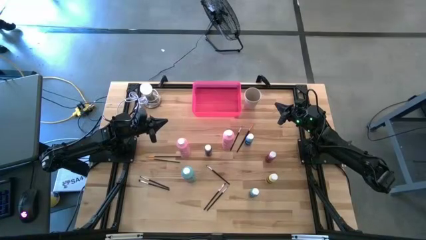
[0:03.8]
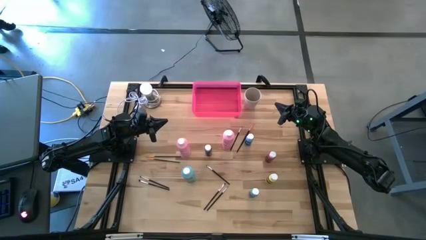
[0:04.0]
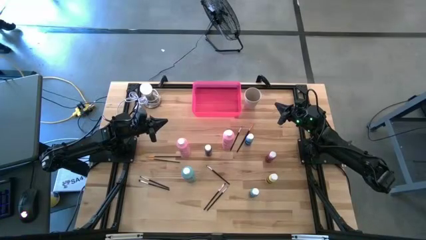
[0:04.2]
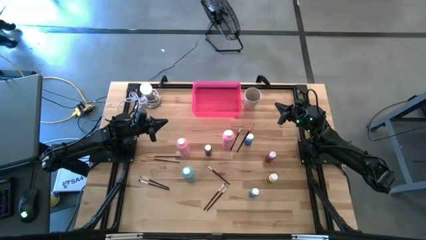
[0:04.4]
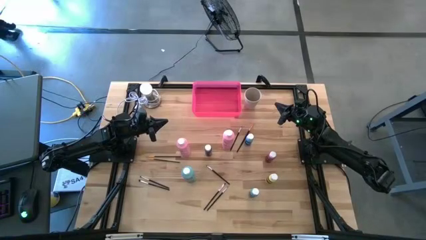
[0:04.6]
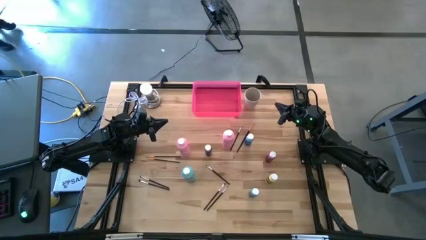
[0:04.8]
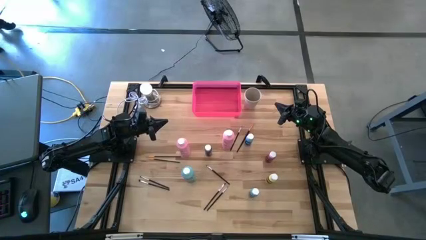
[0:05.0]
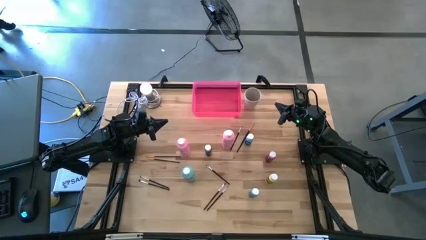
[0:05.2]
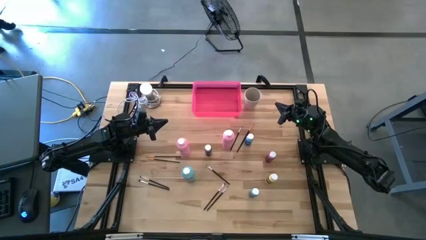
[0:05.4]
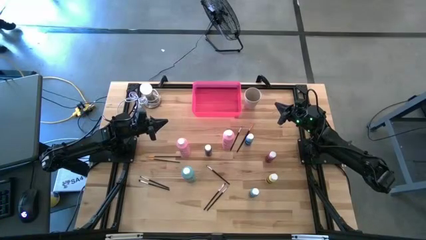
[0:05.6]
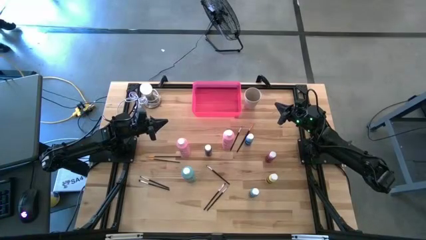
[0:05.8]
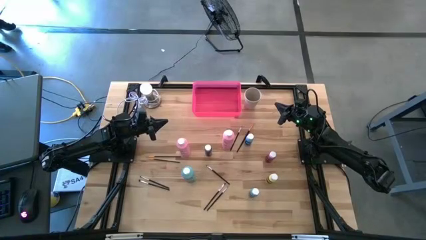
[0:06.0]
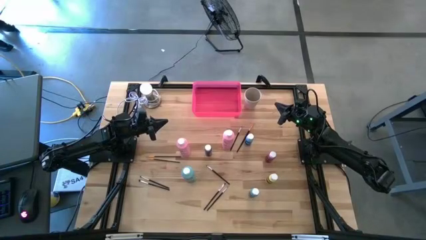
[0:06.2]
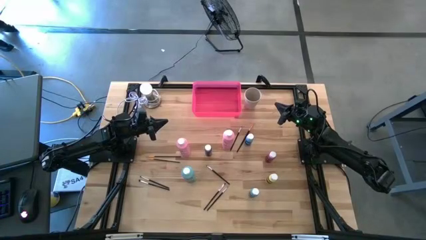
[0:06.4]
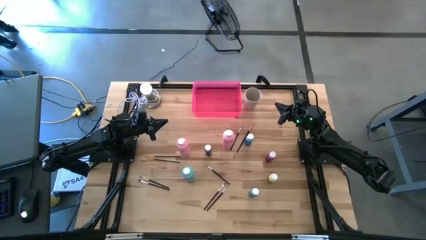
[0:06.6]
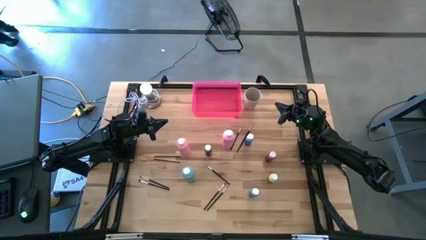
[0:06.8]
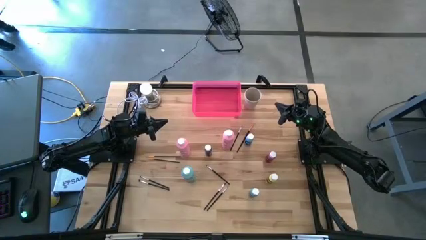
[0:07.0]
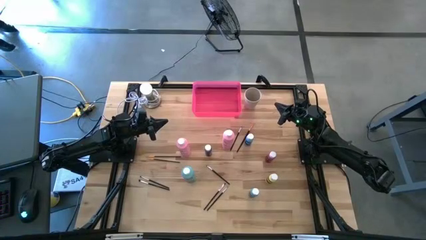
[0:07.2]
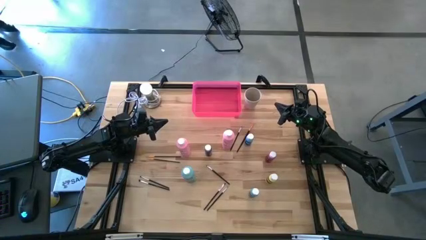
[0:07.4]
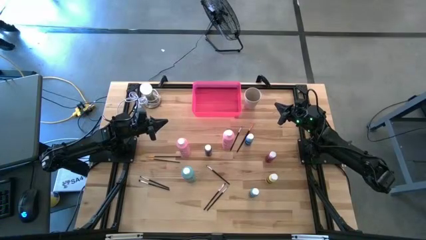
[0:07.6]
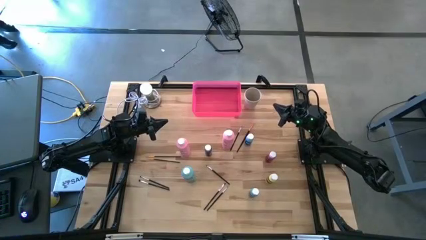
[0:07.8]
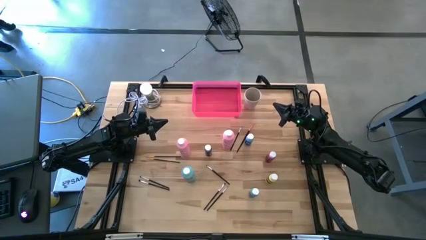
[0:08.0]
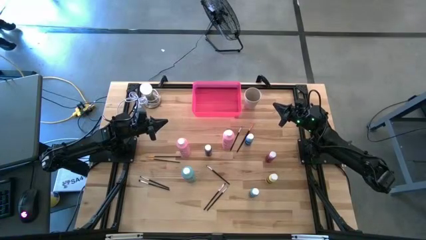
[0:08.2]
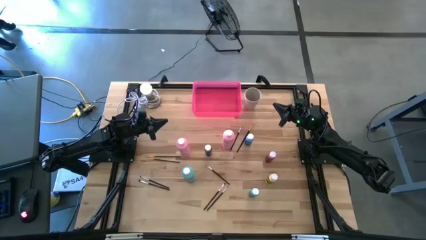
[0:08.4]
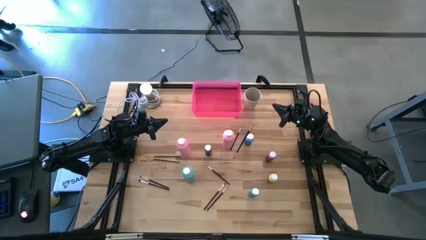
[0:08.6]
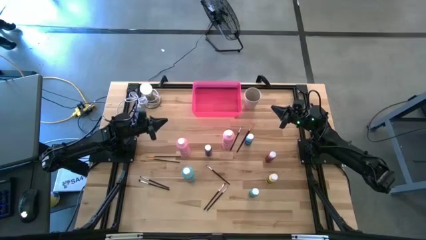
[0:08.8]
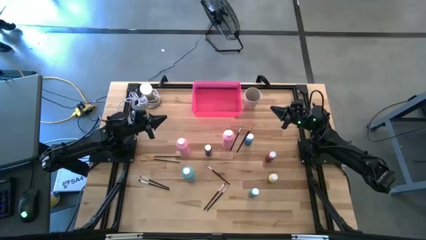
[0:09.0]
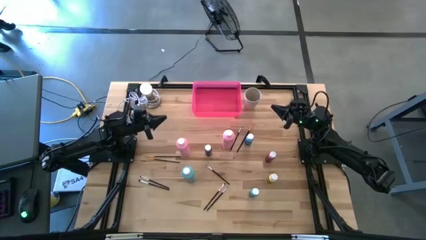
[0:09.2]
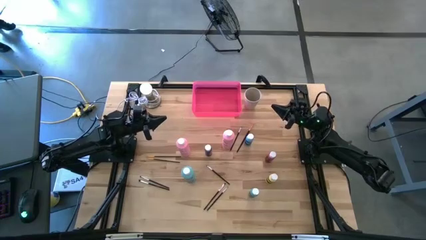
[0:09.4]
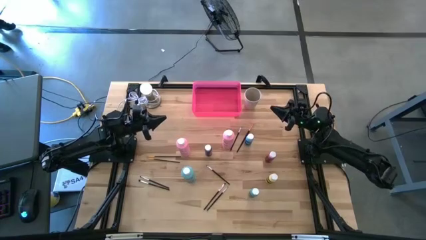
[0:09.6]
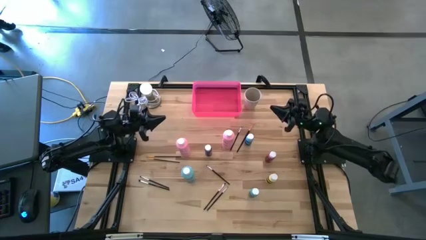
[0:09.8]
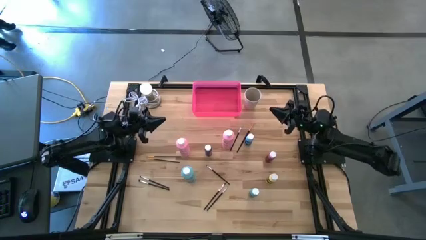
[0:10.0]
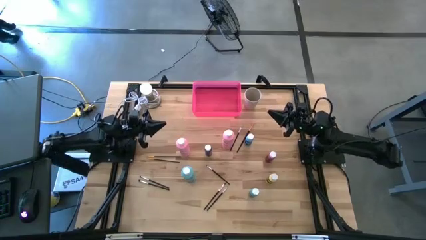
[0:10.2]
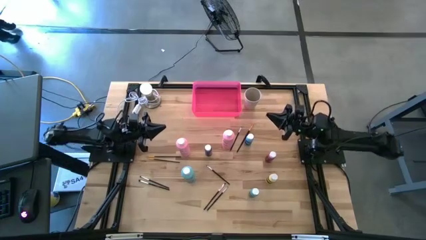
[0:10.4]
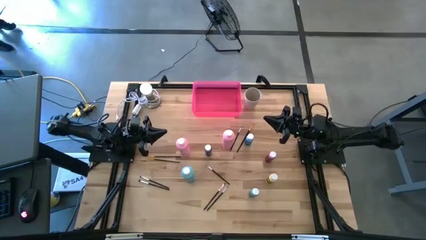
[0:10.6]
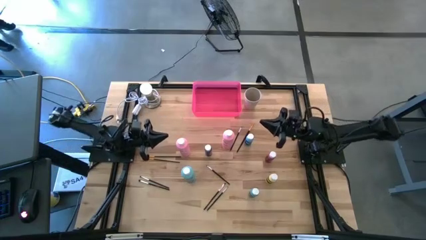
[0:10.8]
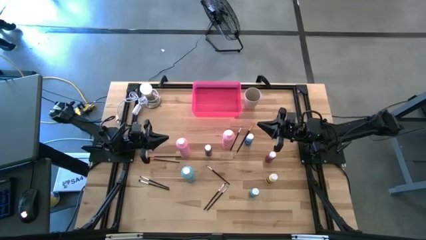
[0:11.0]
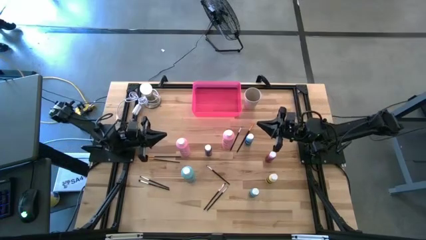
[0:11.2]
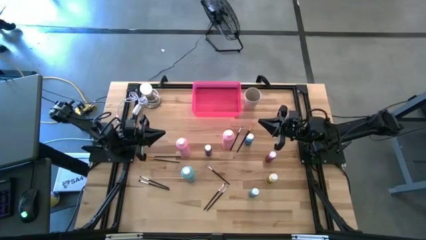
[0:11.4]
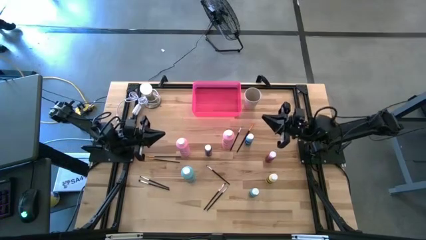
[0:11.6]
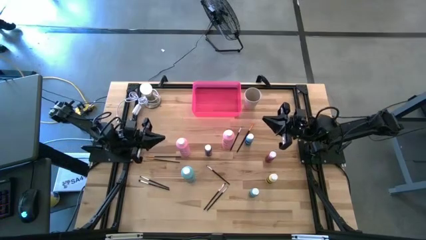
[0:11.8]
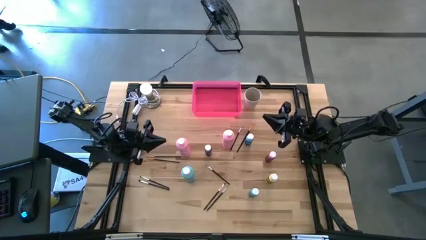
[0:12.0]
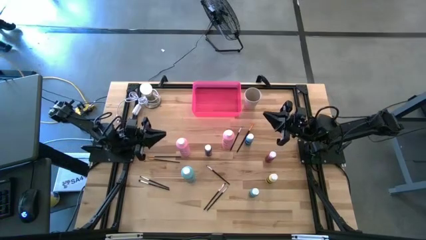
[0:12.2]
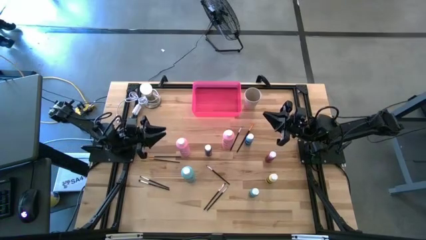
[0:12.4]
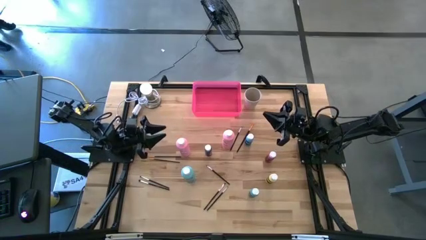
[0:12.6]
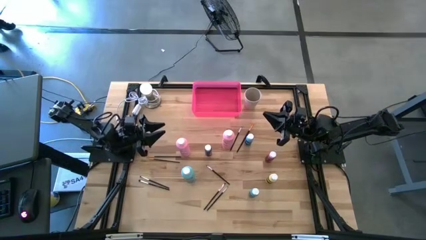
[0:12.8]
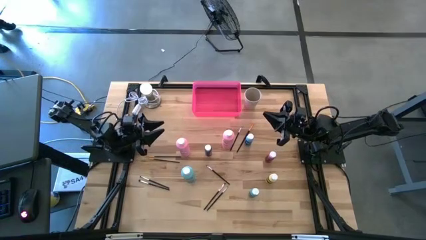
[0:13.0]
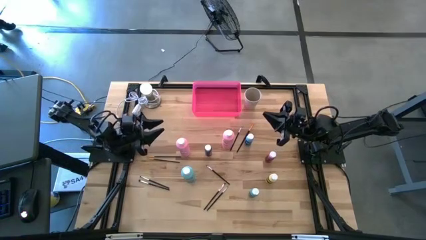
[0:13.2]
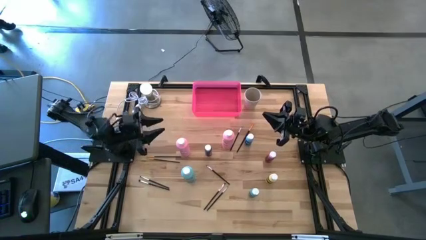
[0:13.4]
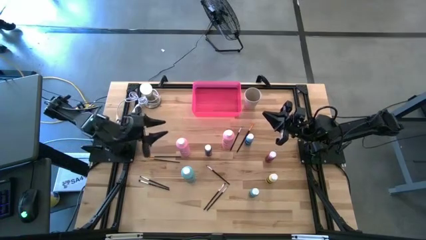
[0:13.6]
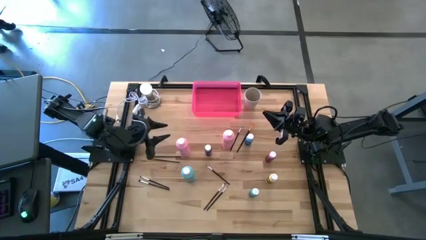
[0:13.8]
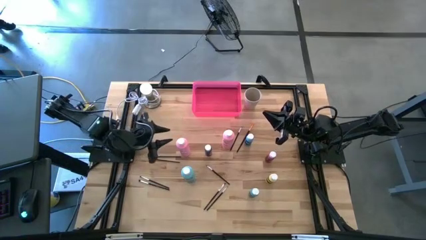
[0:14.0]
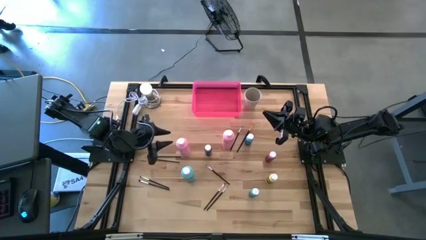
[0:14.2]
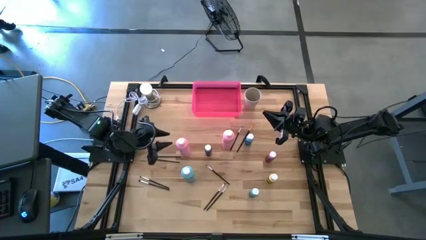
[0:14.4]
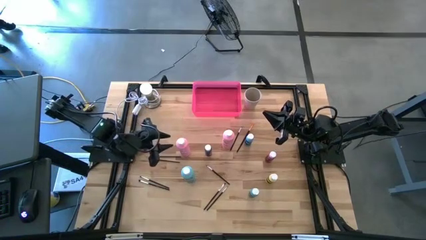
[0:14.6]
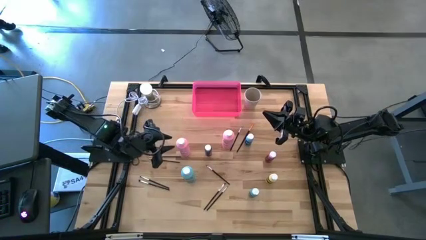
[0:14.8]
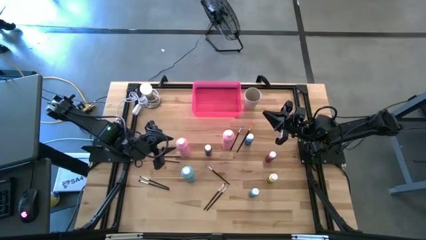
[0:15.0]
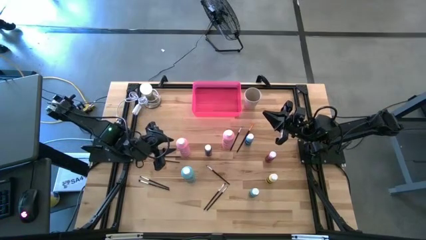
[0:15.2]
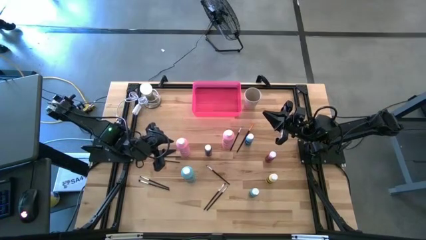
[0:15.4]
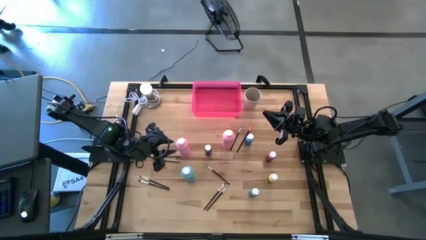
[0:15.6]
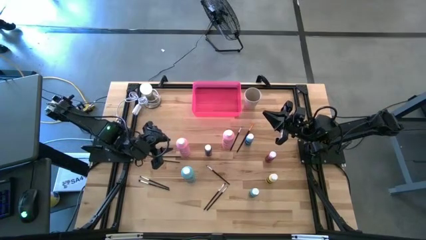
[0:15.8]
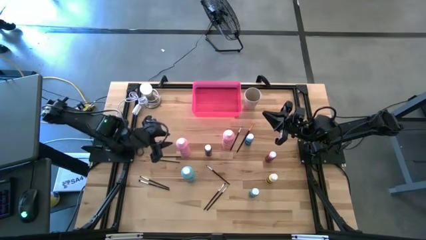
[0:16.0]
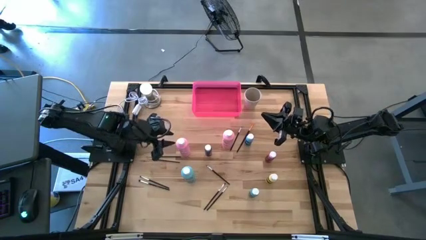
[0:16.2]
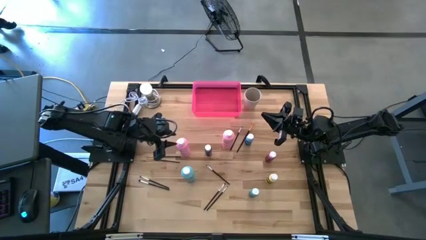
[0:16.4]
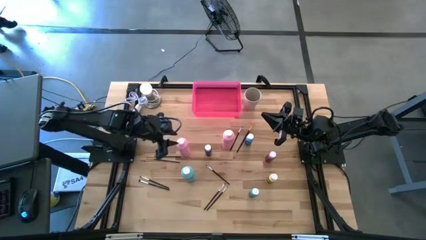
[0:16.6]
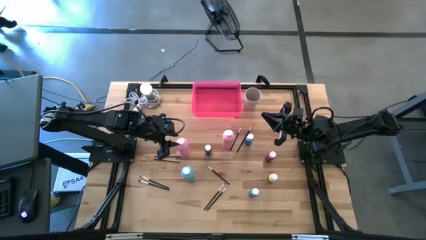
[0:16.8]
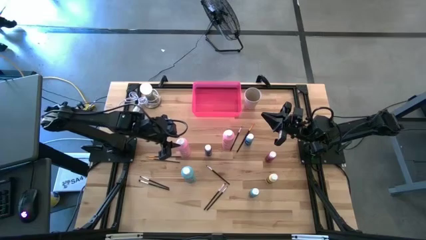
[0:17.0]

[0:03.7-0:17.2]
Task: Pick & Place Paint Supplies
Put the big pink paint bottle into the pink bin
